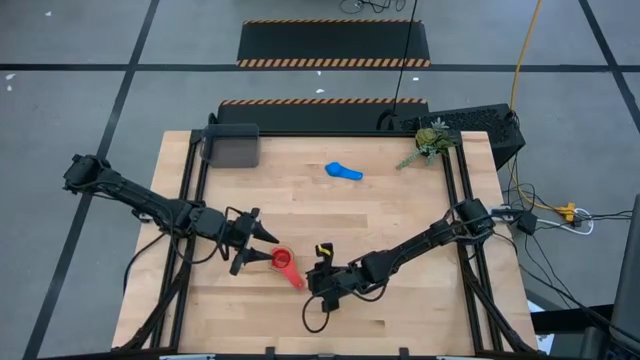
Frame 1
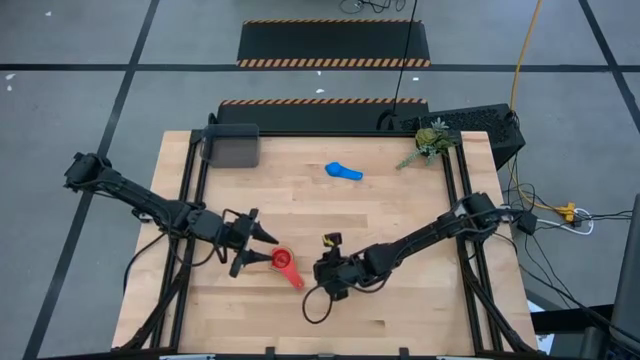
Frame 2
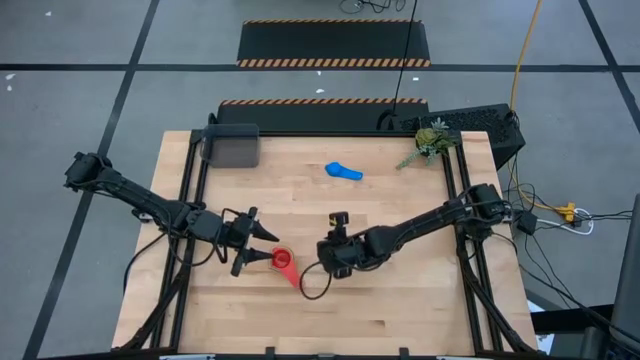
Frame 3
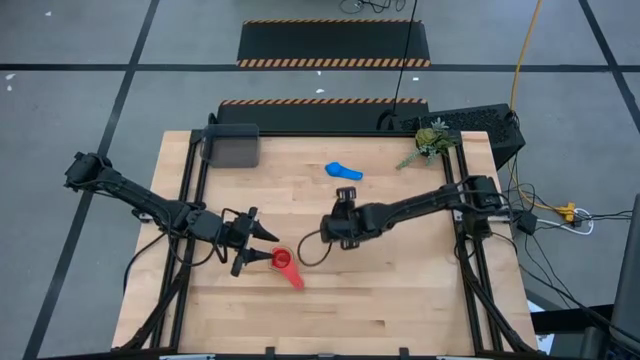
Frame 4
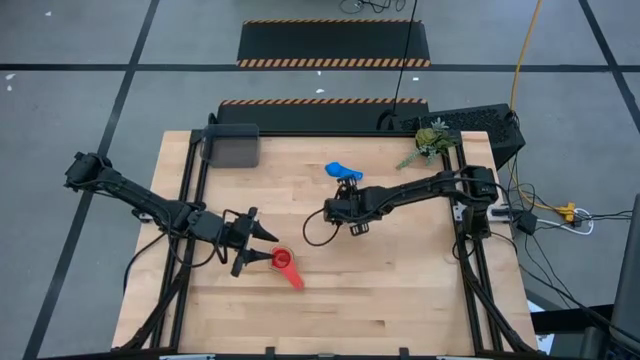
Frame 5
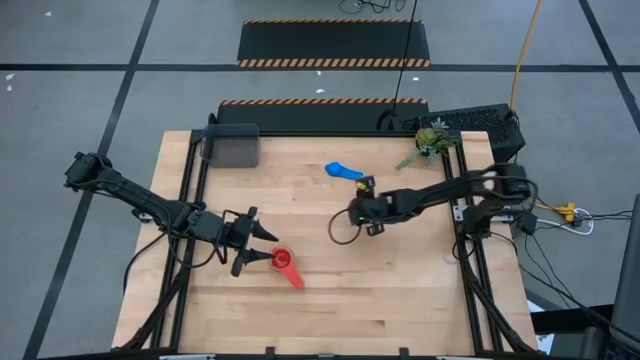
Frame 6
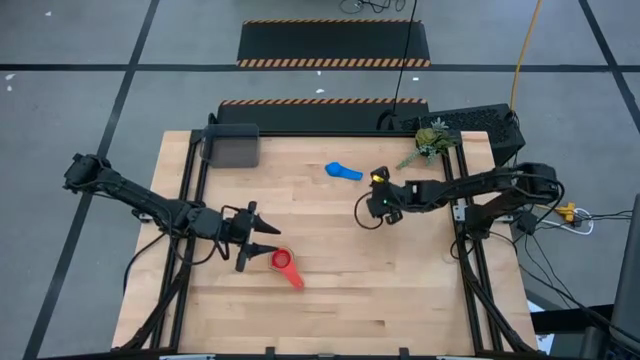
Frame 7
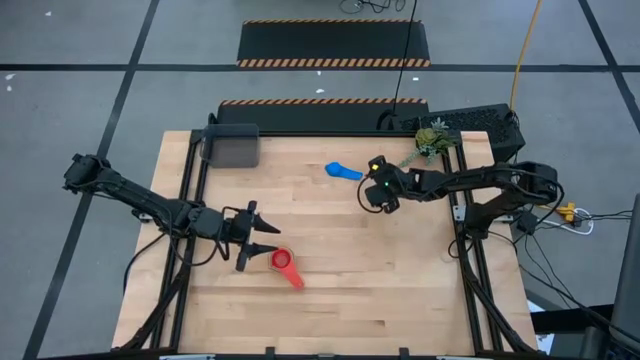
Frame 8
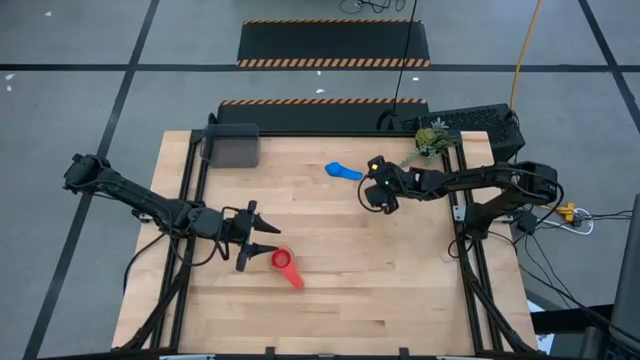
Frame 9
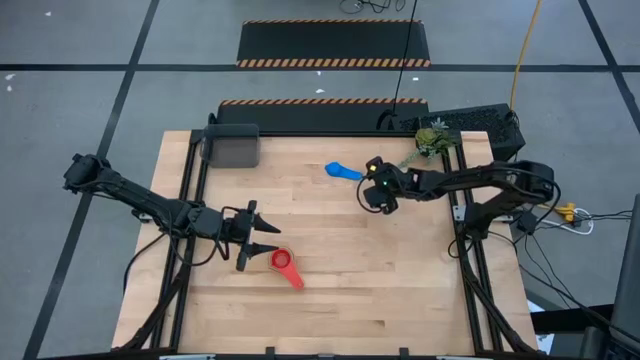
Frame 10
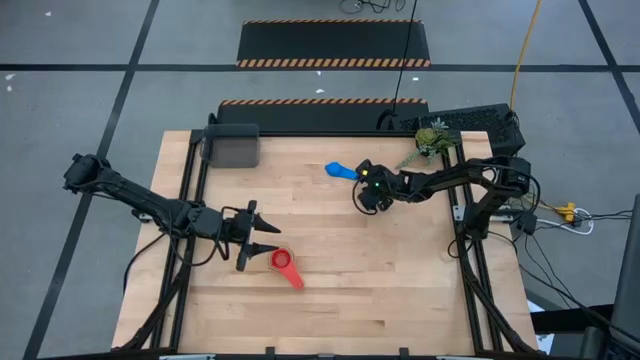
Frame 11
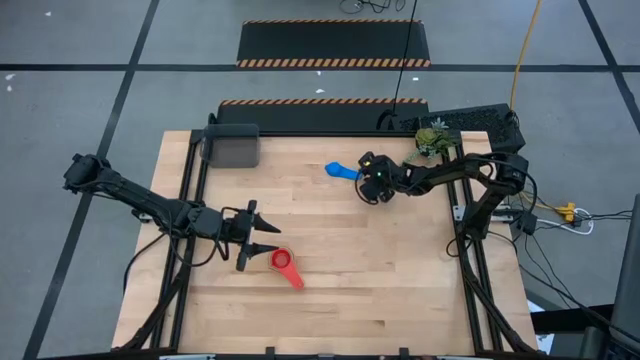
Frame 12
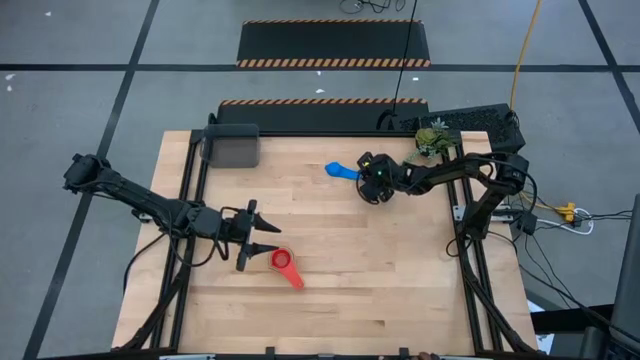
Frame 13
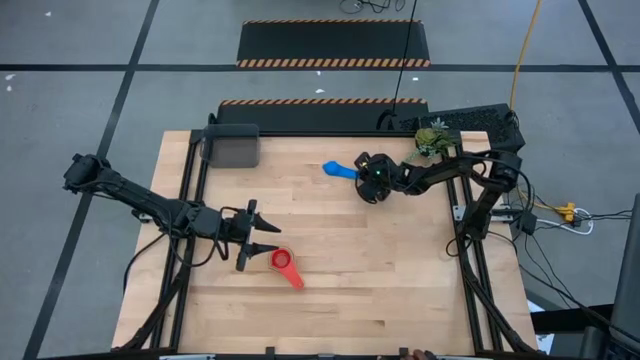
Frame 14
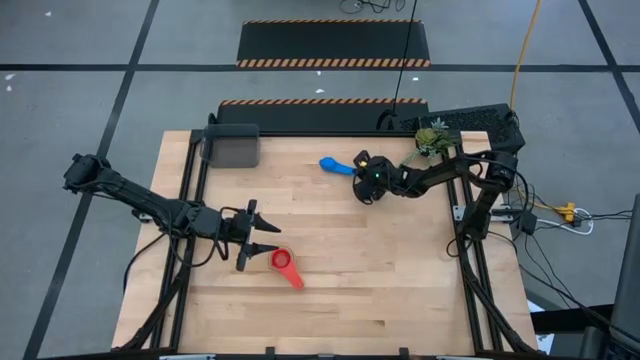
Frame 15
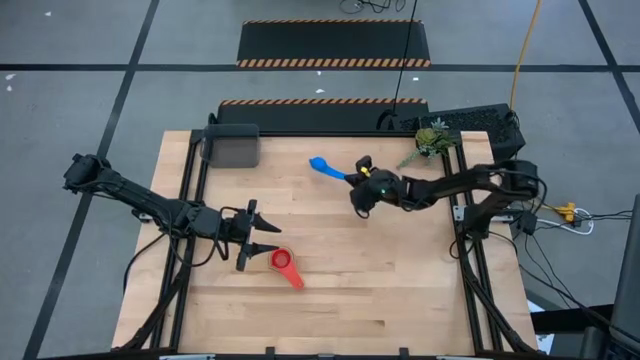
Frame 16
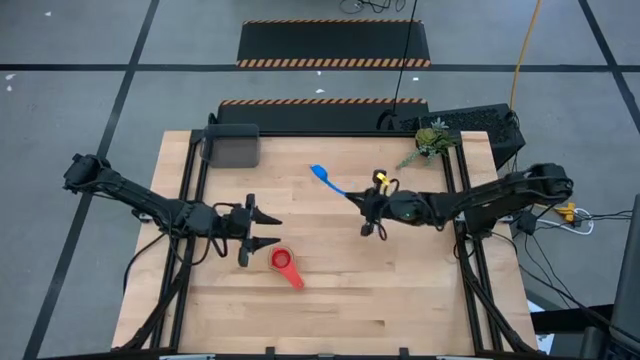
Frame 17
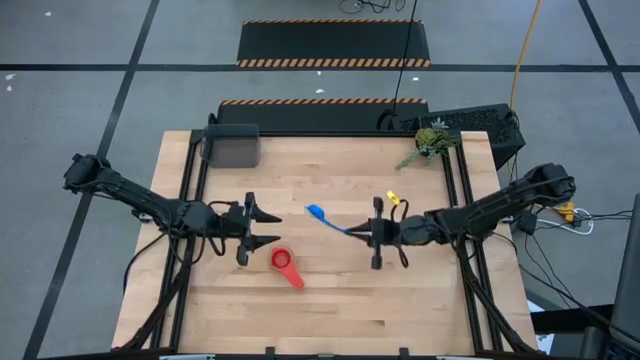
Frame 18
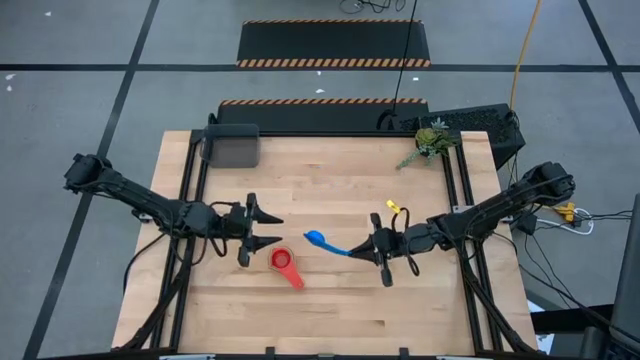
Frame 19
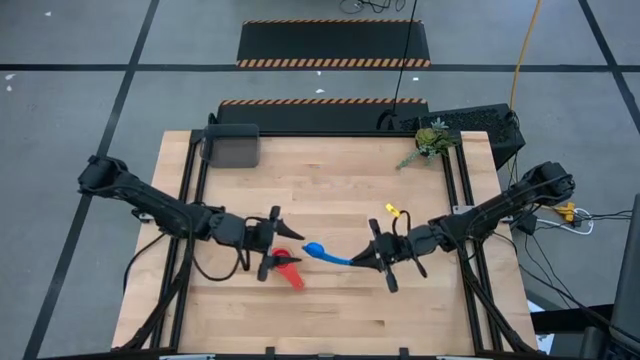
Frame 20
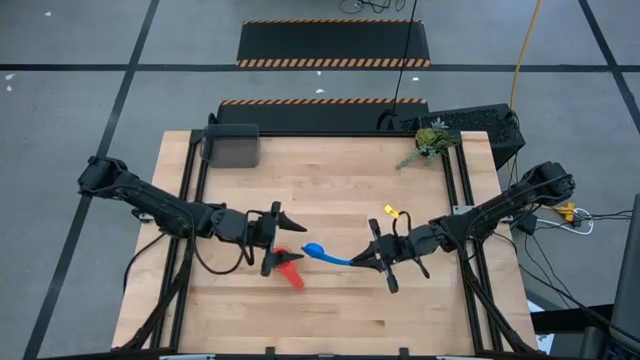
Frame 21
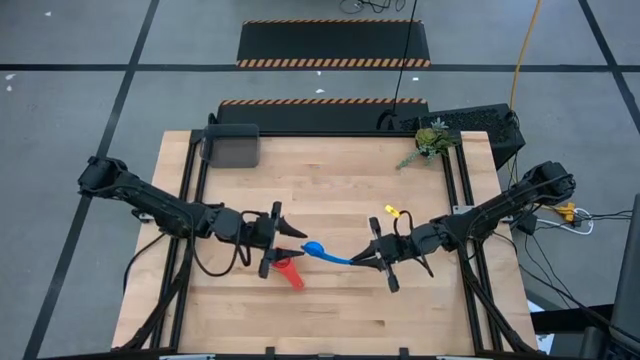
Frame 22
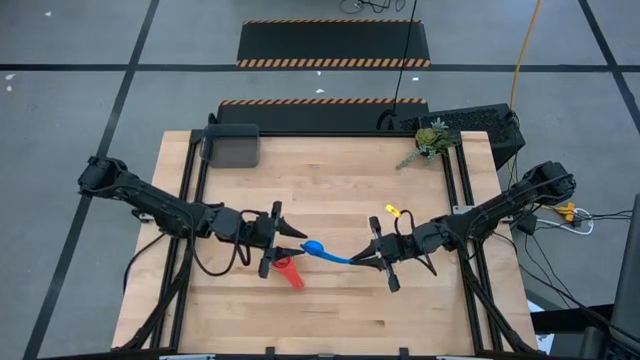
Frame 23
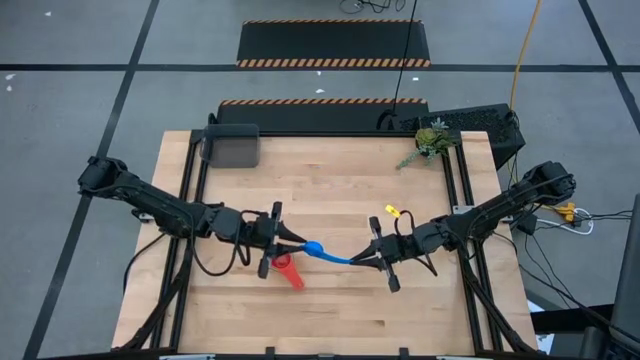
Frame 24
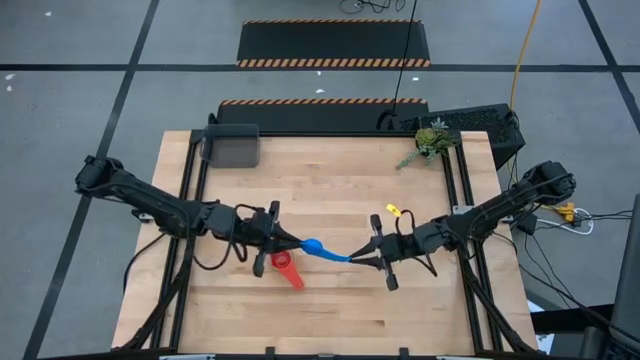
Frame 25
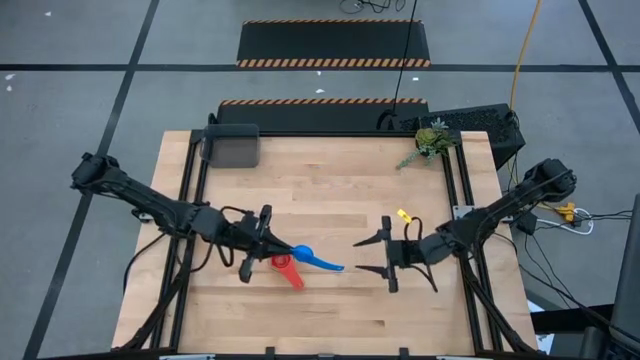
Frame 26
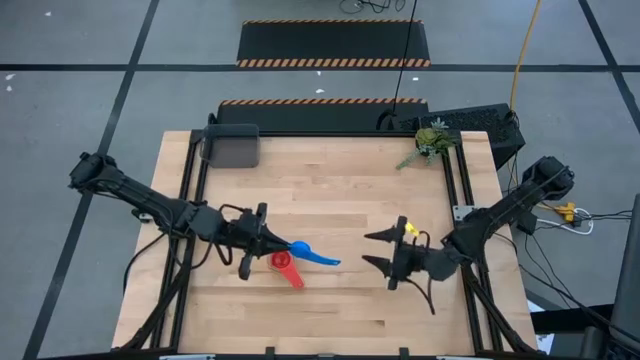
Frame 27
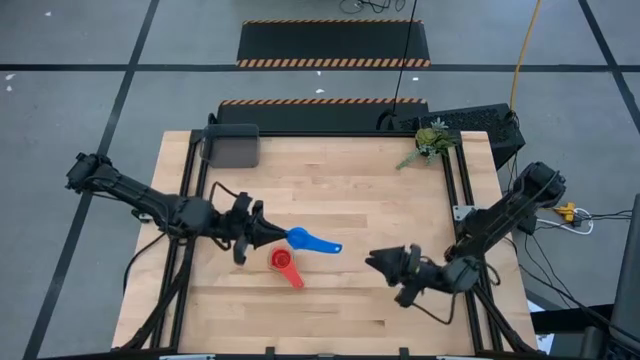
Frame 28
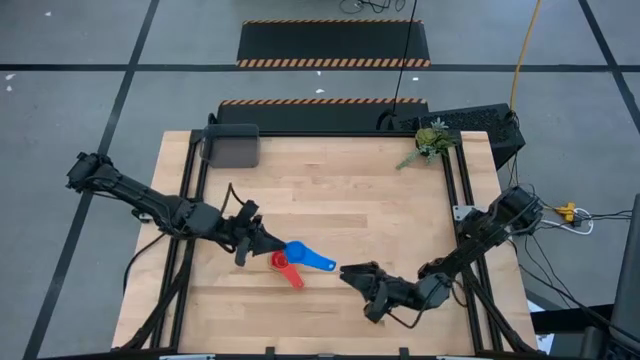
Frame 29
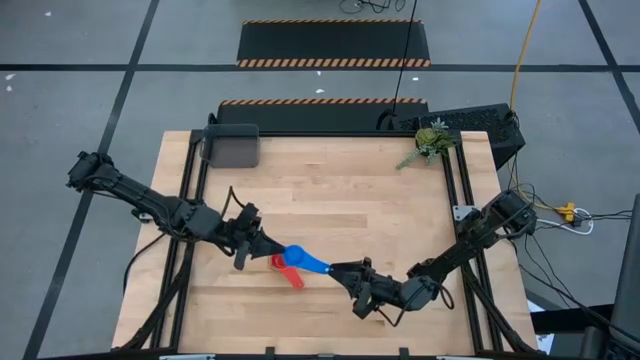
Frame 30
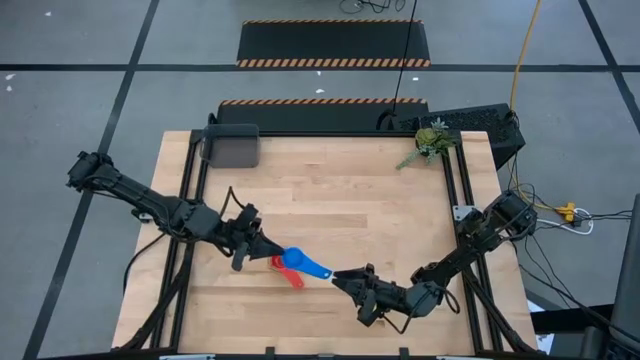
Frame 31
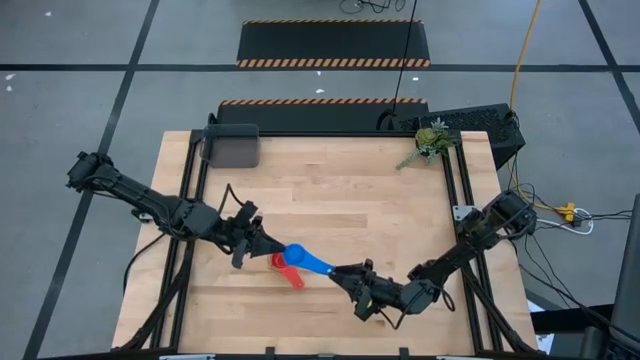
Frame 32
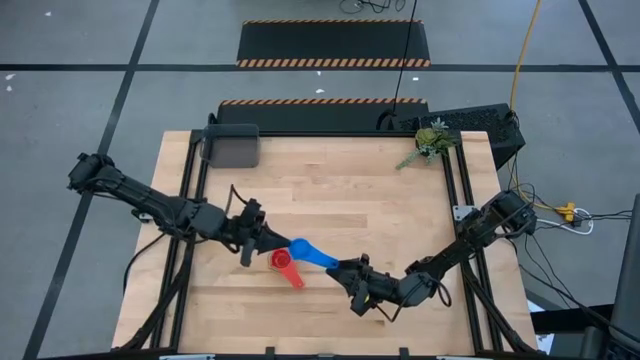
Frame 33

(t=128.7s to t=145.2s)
Task: Nest measuring cups in basket
Stack the blue measuring cup on top of the red measuring cup

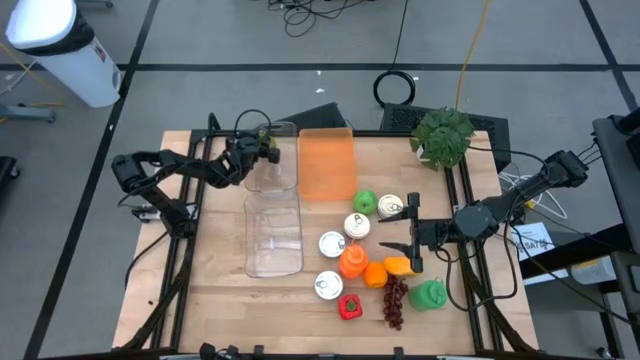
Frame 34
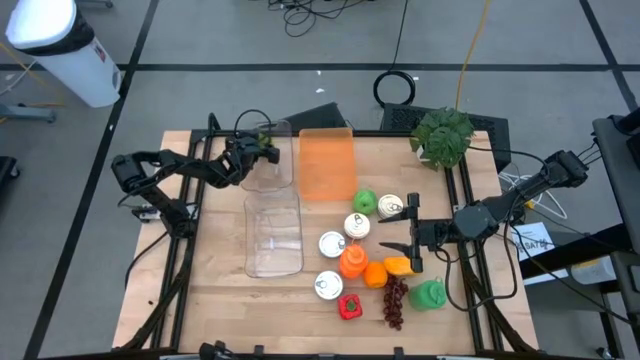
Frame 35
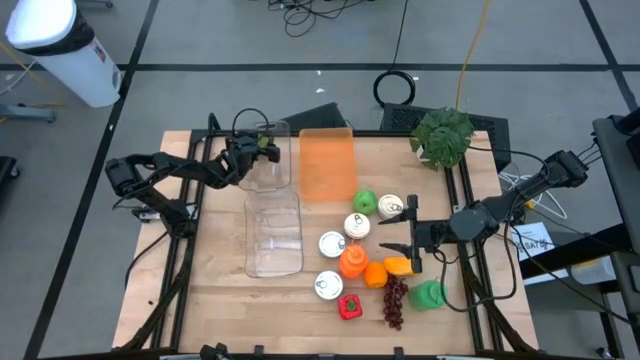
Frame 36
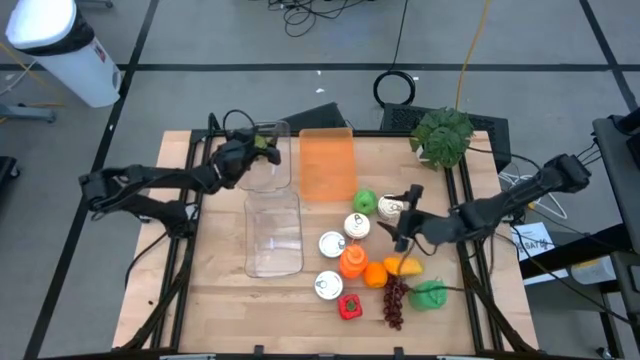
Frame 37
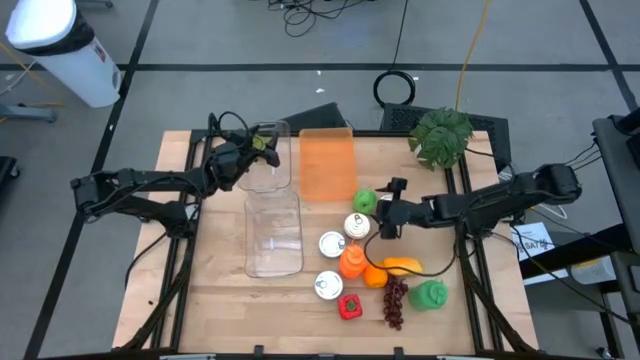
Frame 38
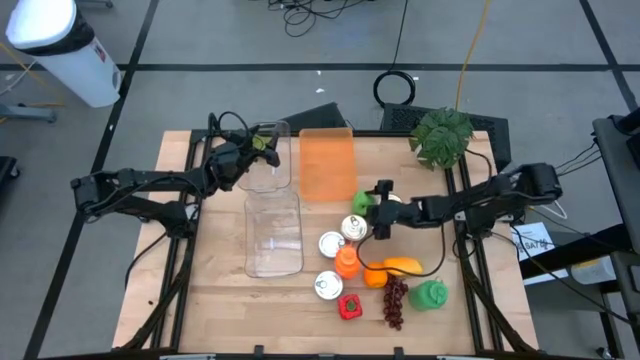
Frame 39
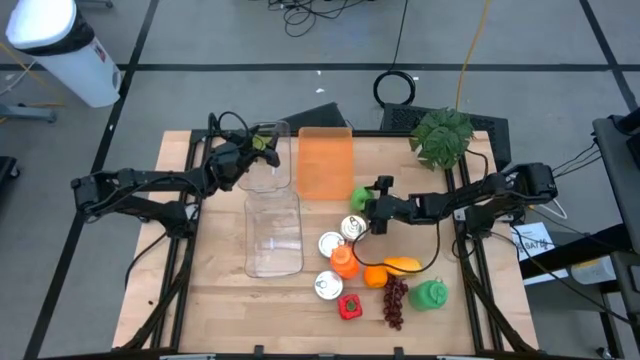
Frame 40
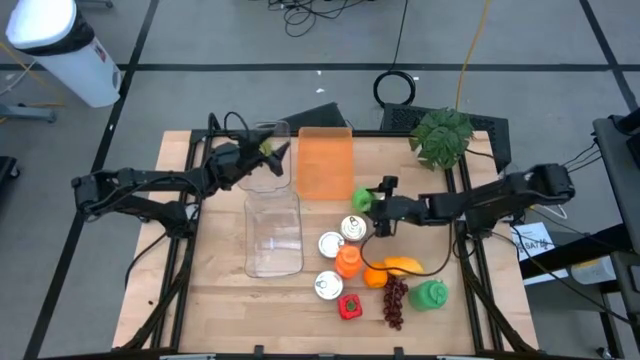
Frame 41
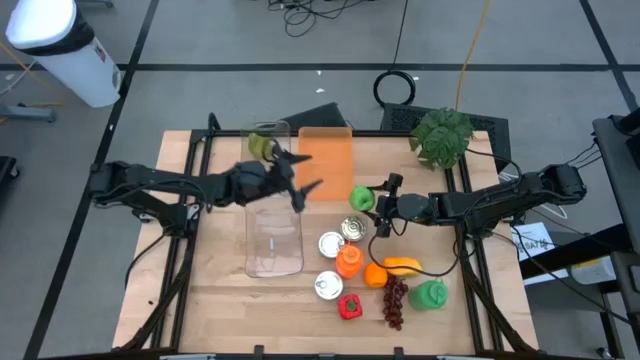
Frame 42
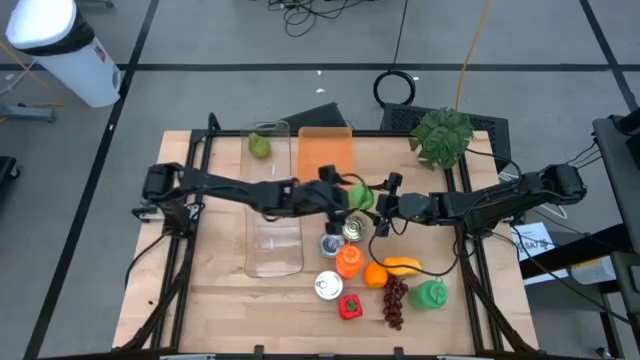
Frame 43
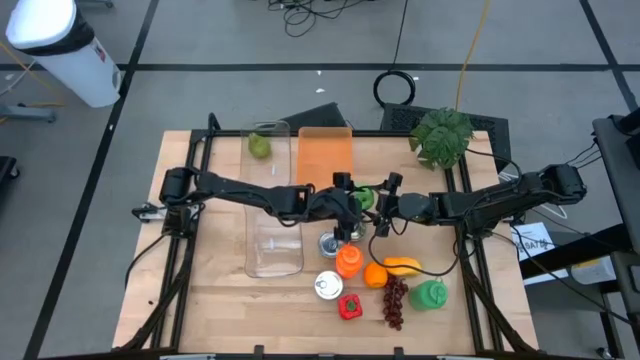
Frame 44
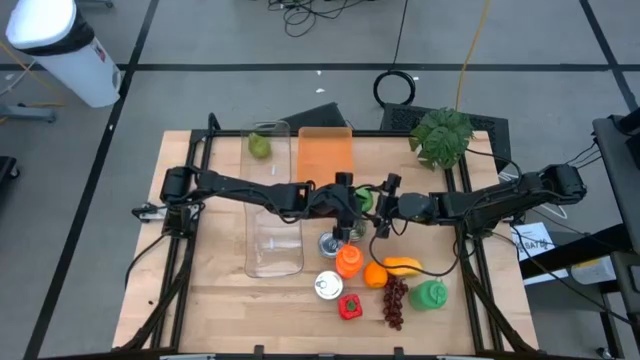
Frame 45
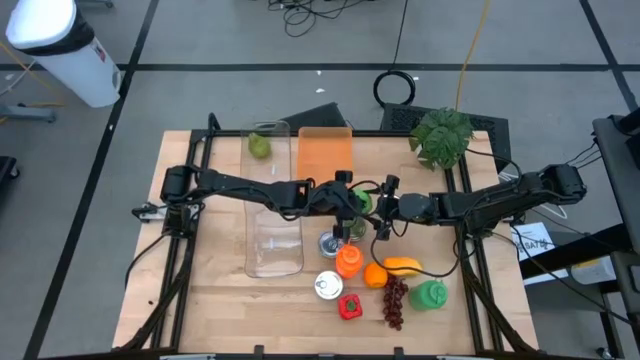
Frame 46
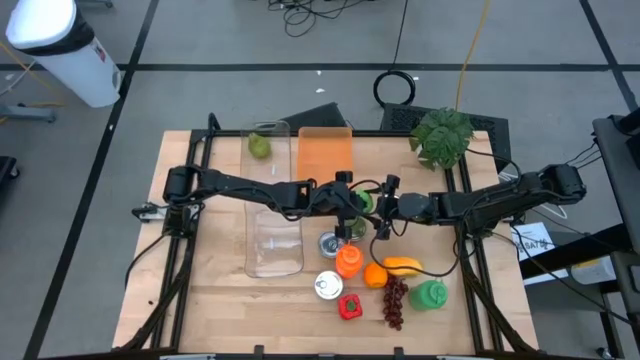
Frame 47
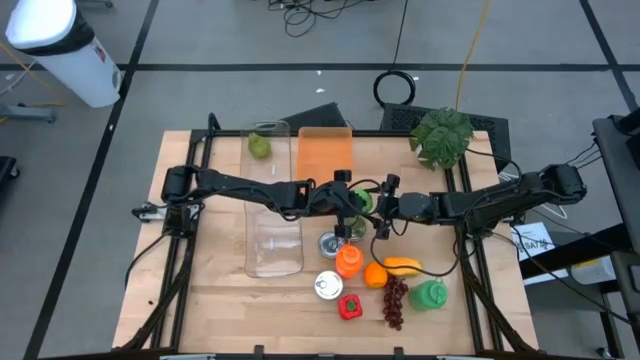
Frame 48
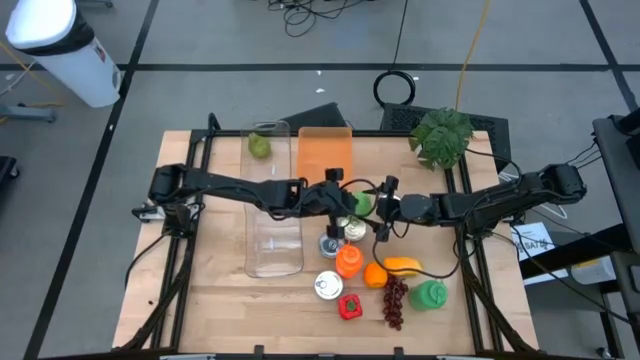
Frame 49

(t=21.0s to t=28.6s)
Task: Pick & Place Food Item
Put the green apple into the top transparent bin
